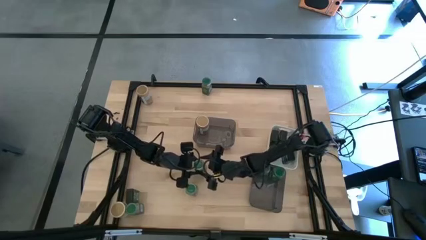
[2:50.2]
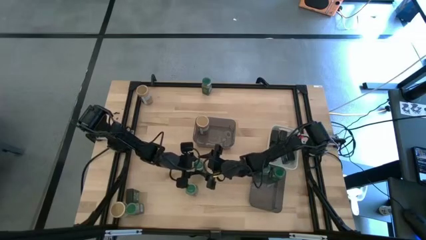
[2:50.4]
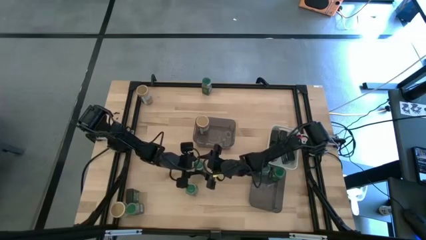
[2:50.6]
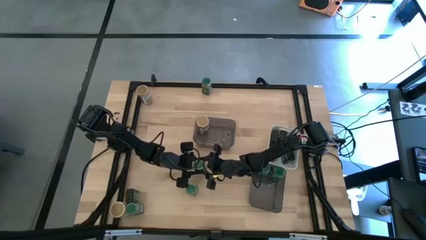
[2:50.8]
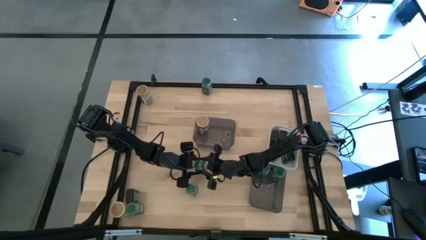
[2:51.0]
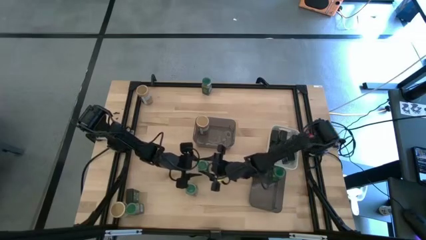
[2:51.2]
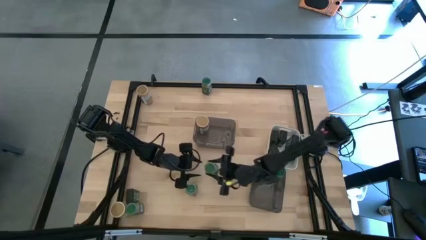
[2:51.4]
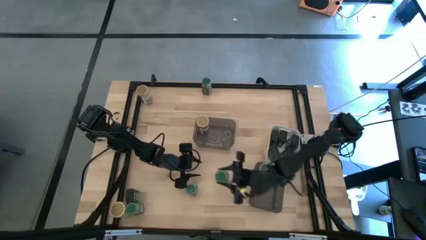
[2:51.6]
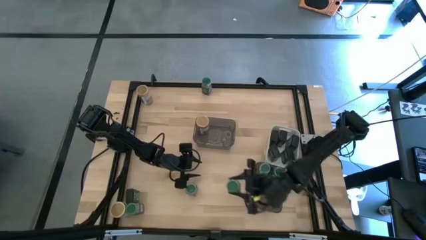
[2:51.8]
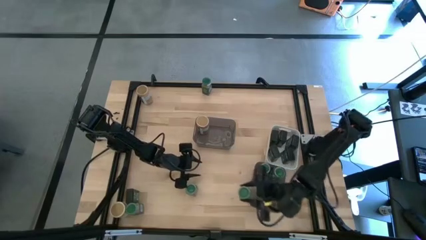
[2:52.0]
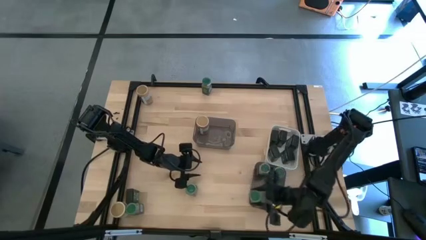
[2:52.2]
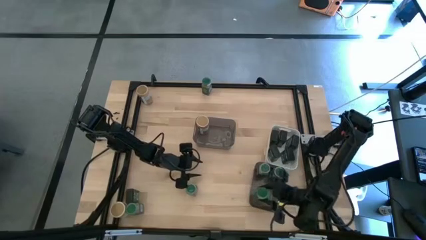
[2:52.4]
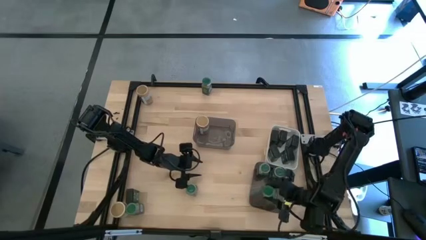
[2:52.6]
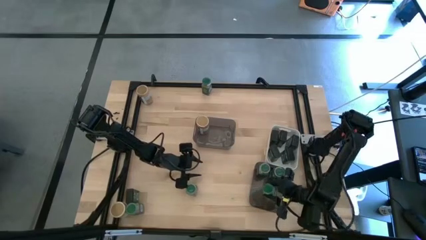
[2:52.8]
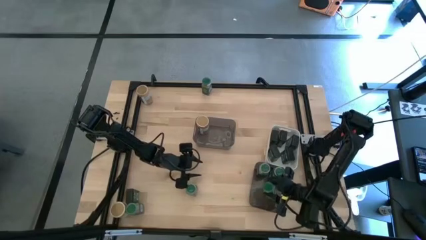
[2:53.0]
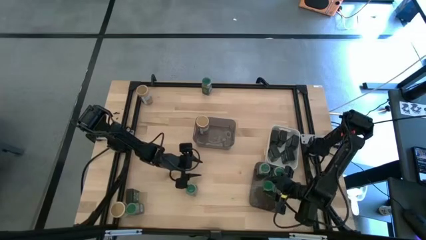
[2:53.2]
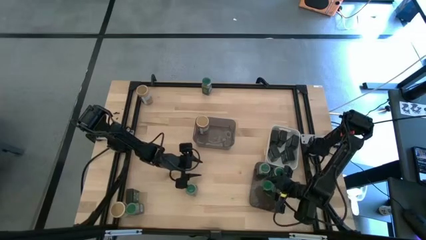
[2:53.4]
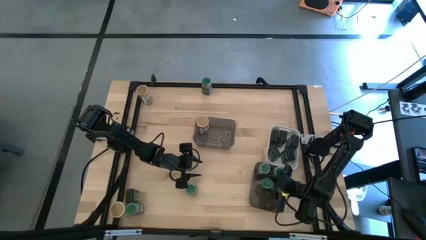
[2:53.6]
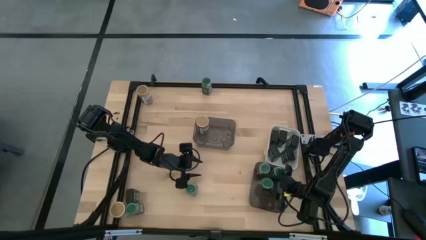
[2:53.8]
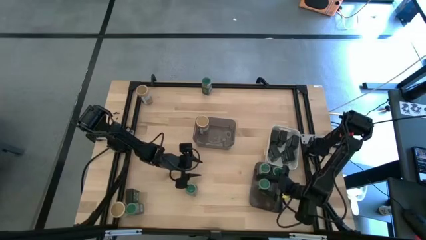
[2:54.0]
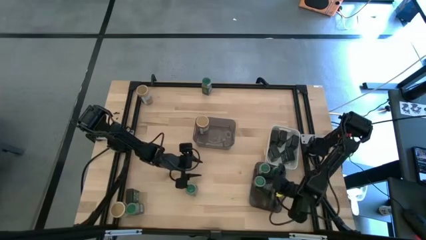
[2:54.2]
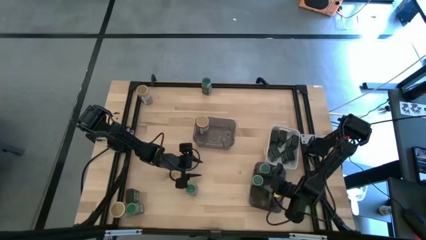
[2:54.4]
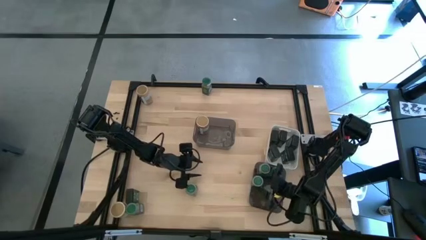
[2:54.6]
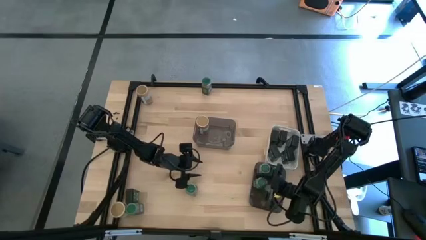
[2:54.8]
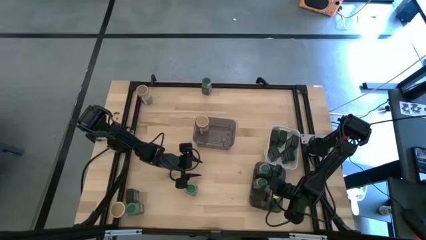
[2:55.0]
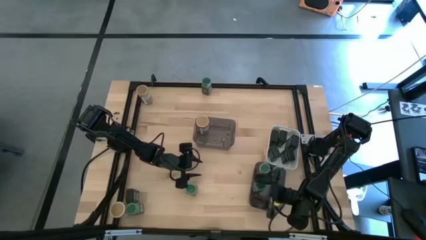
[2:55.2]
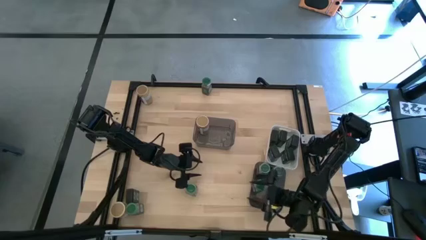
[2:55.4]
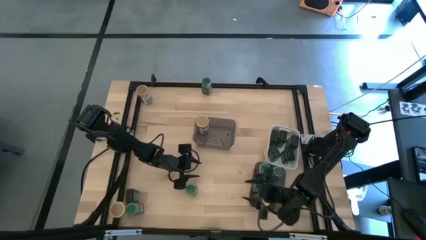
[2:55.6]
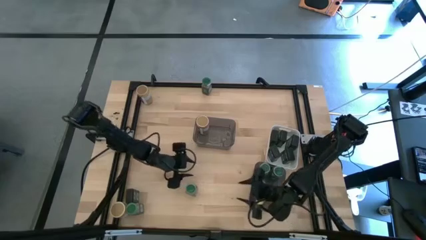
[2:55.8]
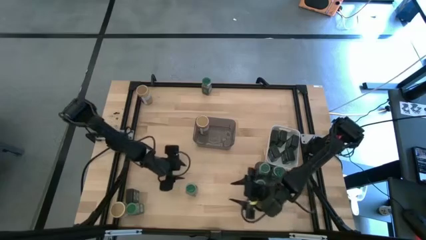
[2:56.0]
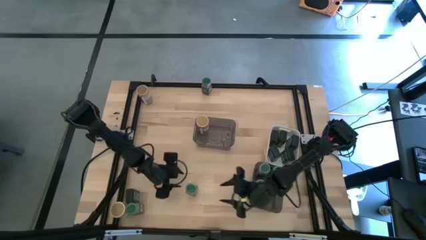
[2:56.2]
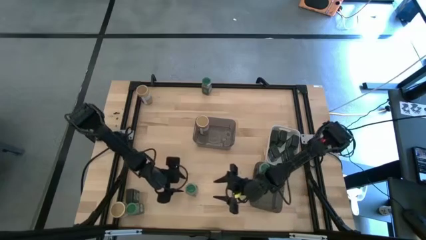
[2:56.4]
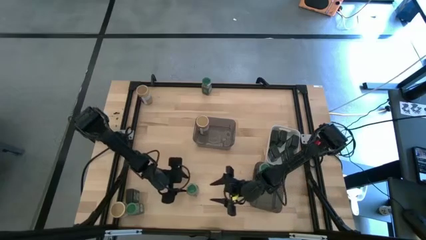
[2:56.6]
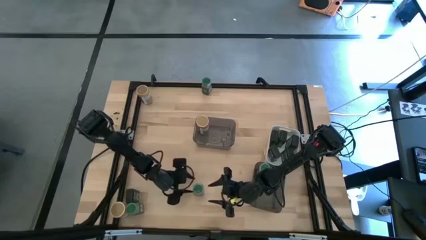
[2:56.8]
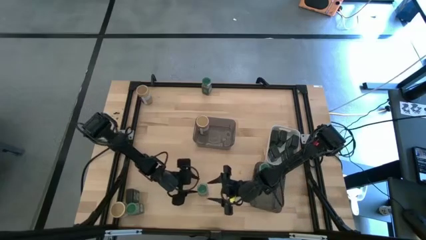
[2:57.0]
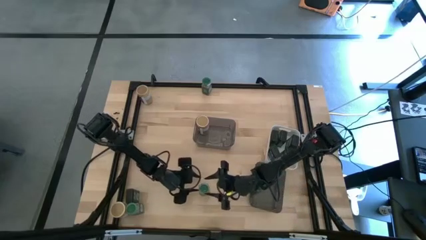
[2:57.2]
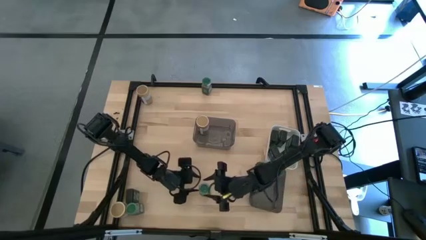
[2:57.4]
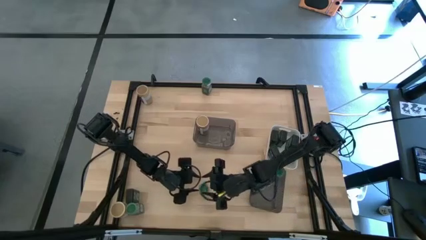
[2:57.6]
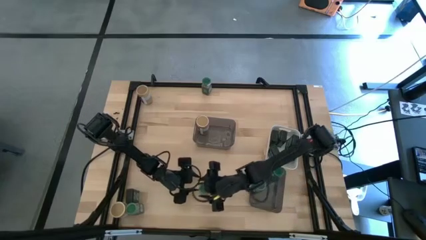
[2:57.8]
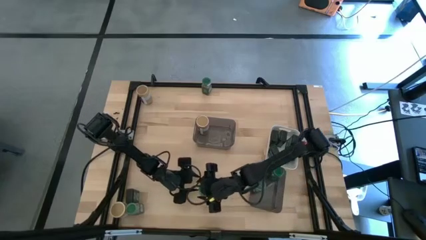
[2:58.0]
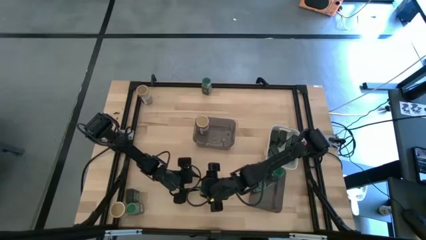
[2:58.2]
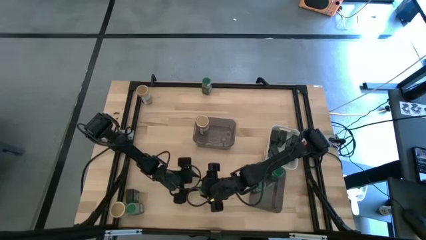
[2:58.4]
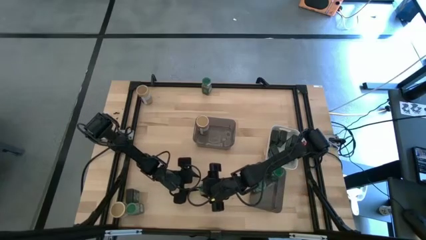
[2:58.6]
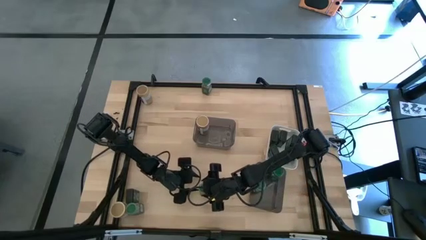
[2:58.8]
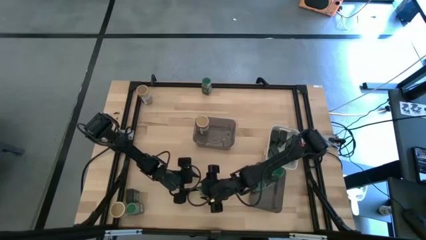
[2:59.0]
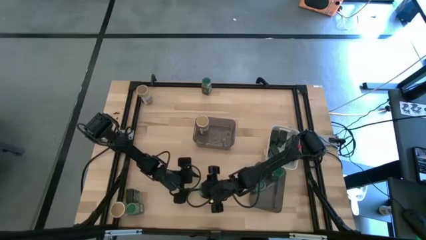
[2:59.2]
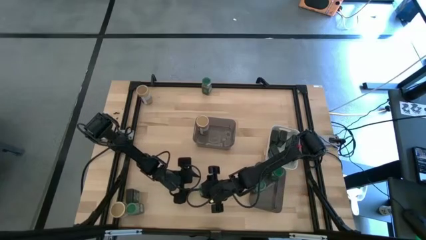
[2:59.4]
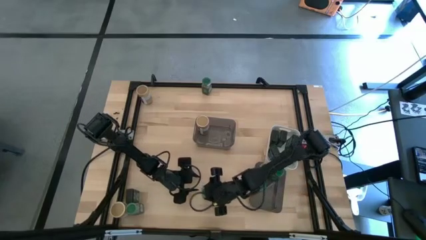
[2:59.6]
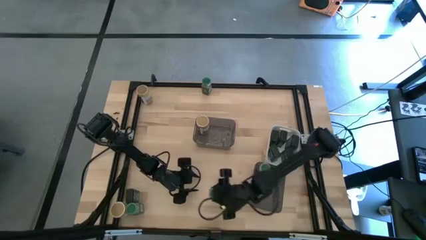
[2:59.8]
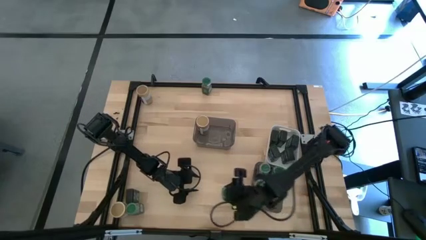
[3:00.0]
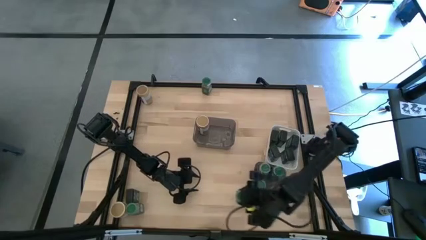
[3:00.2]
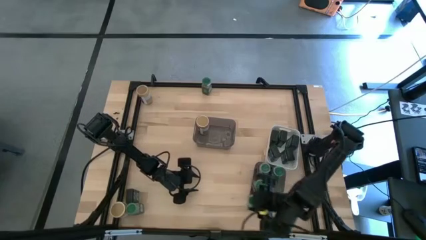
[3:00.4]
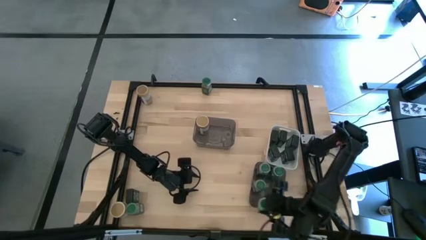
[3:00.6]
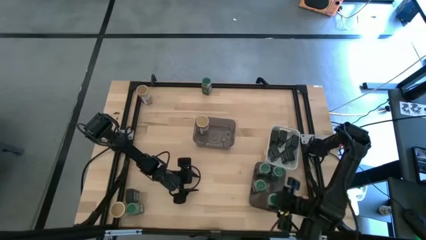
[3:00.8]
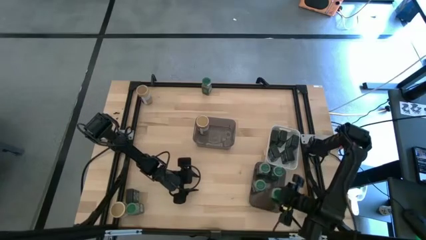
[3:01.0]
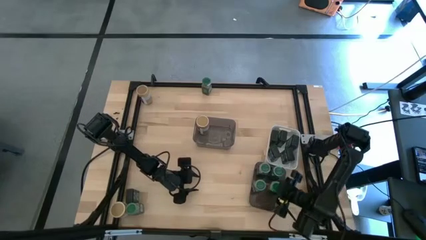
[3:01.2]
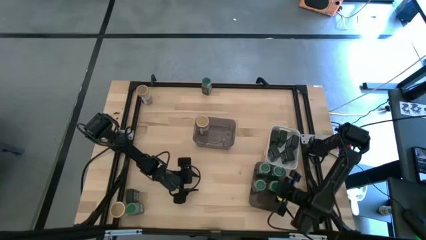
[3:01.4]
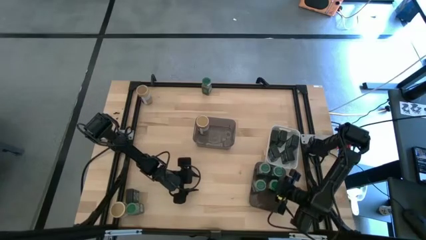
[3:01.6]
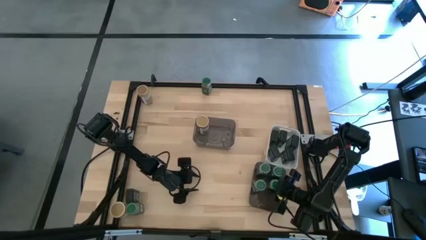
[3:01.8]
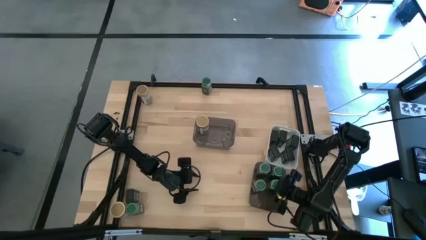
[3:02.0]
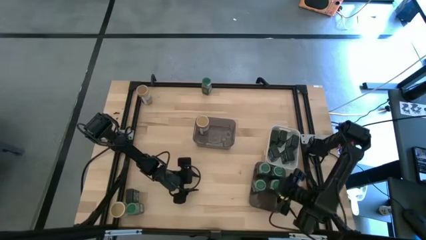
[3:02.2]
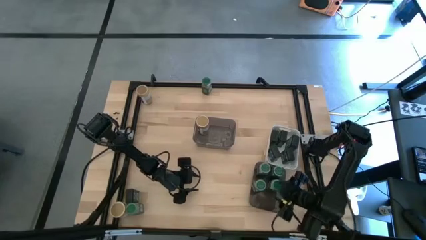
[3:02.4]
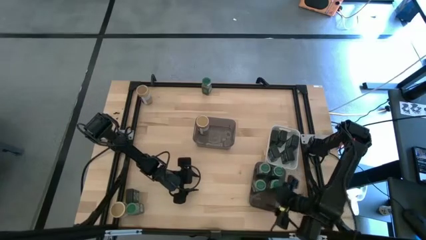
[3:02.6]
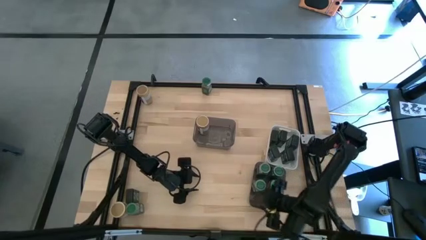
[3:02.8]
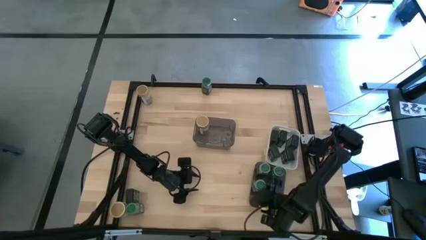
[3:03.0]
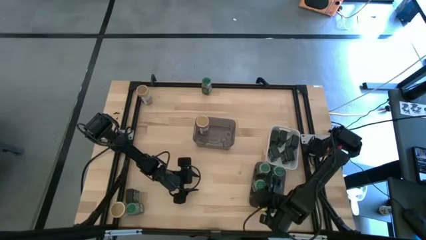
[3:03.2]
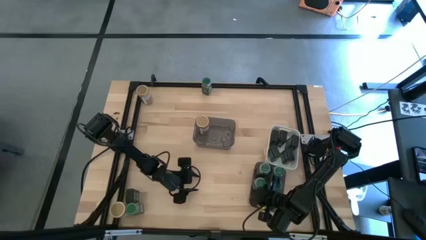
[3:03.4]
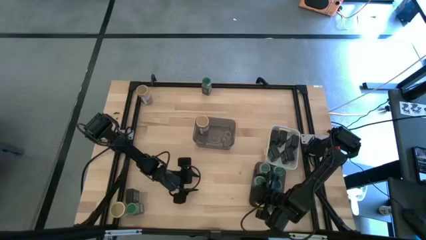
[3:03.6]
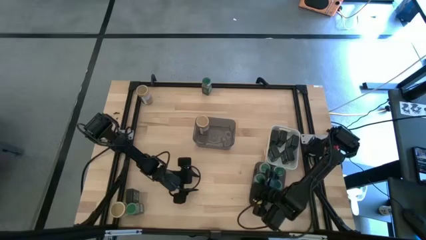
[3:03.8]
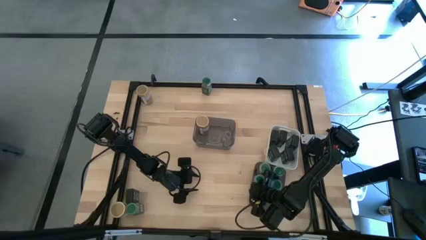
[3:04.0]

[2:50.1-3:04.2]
Task: Sort spices by type
Put back all the green seasoning bottles into the bottom black bin

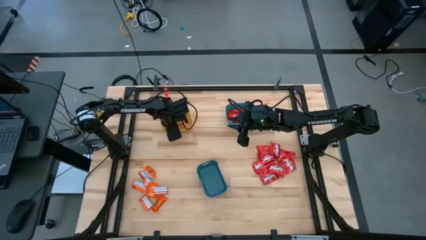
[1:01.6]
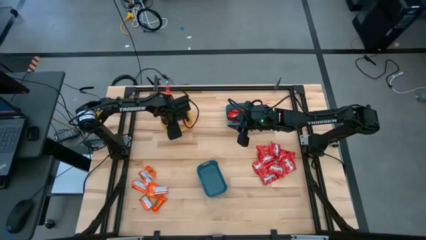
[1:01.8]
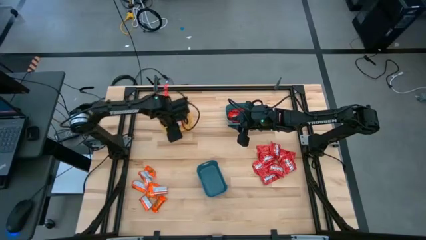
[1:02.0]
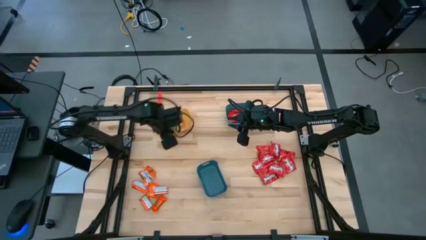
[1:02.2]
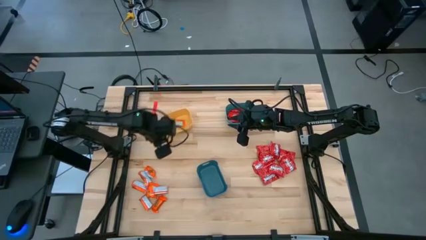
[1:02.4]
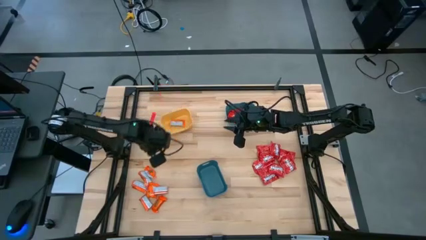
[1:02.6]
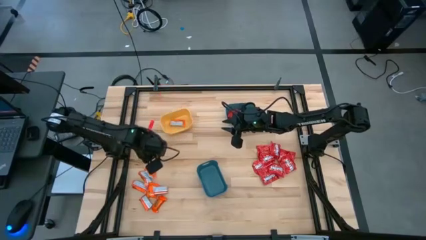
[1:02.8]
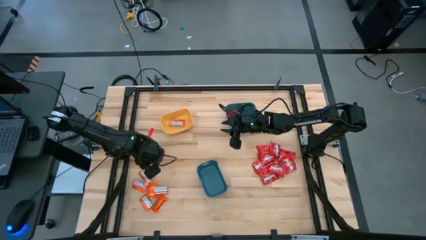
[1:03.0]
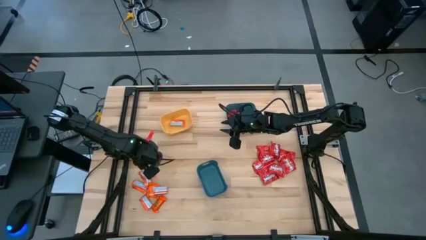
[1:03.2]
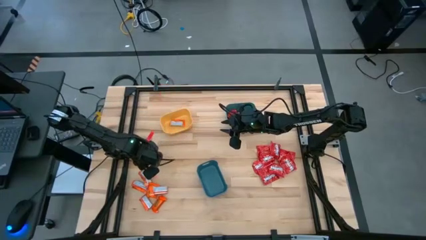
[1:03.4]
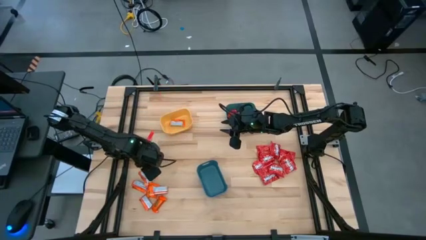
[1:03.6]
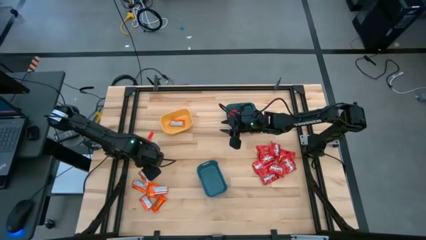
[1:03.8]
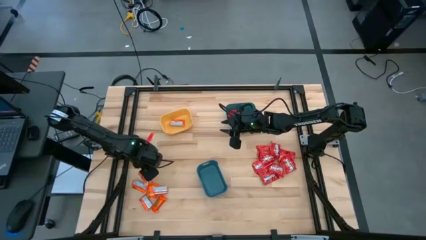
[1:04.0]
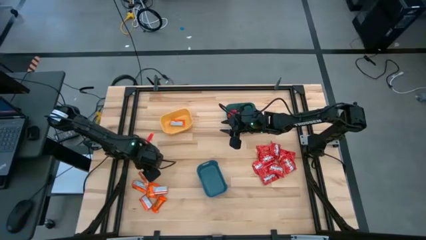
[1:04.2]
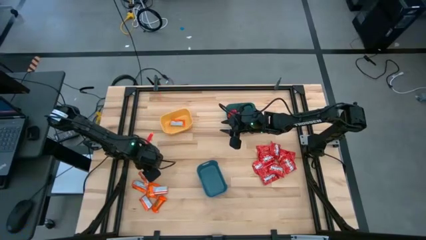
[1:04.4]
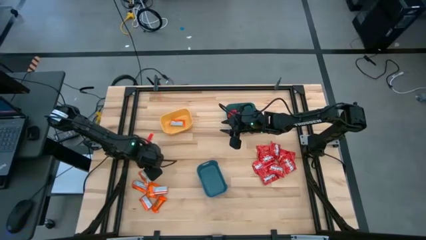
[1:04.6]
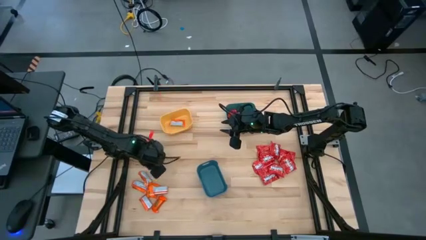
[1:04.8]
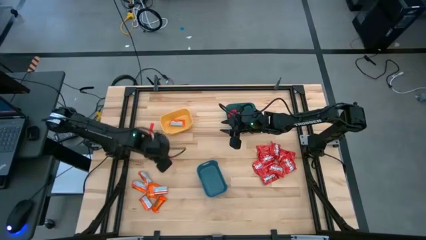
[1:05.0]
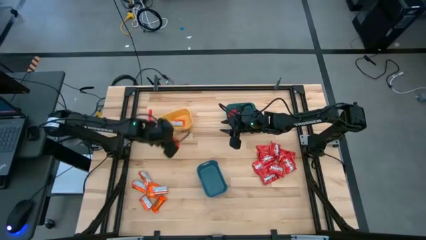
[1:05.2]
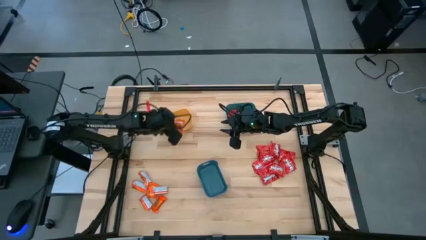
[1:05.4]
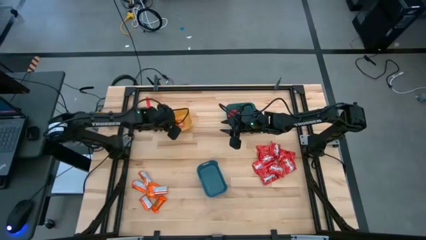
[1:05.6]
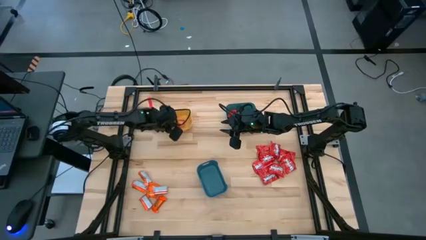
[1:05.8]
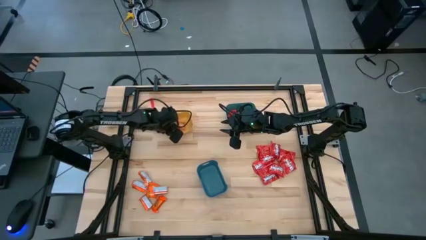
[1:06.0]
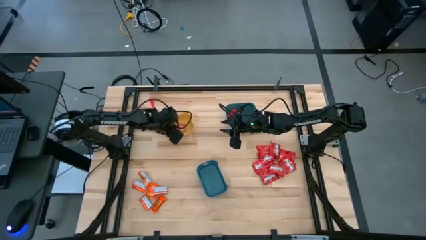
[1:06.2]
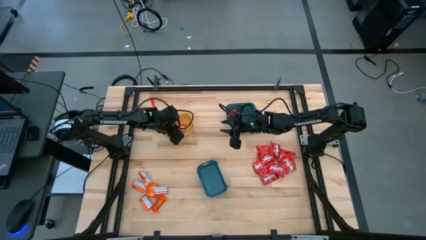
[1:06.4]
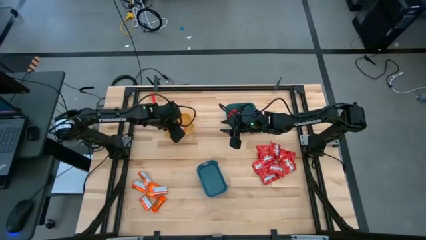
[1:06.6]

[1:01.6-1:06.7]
Task: Sort candy
Put the orange chocolate bar into the yellow bin
